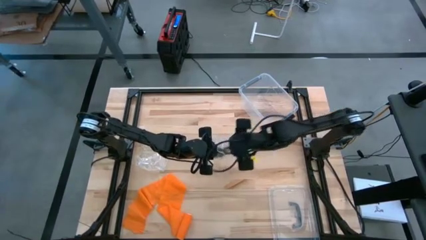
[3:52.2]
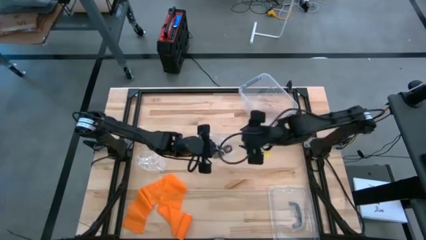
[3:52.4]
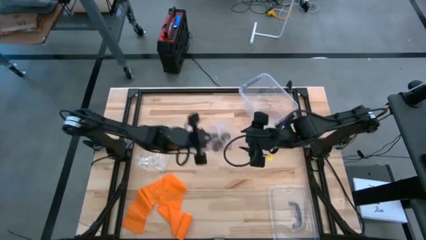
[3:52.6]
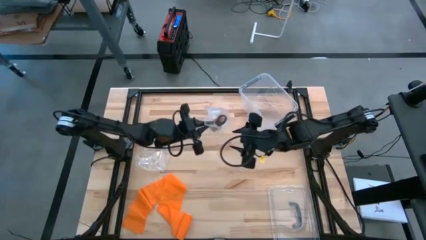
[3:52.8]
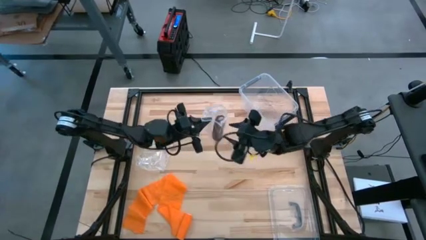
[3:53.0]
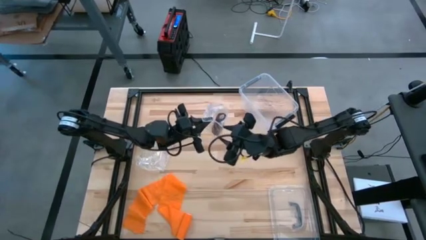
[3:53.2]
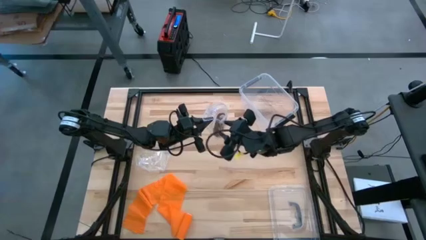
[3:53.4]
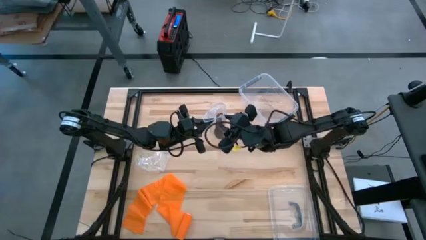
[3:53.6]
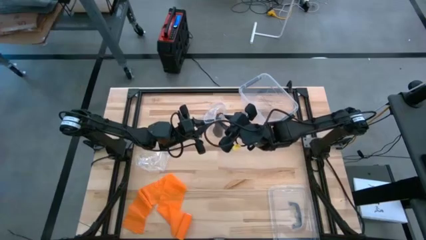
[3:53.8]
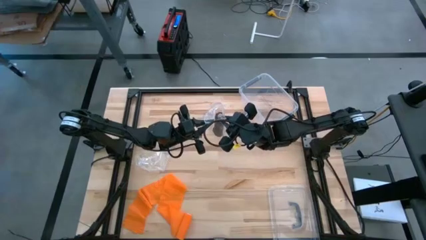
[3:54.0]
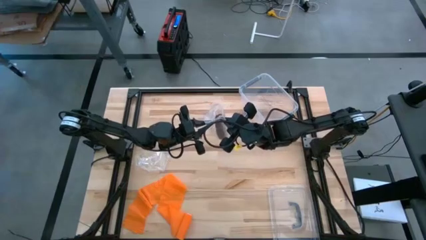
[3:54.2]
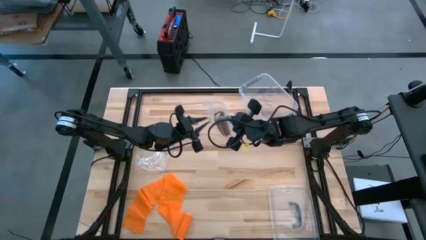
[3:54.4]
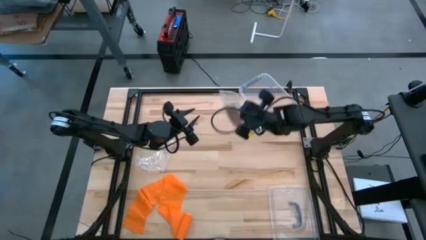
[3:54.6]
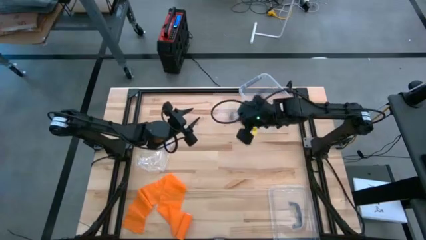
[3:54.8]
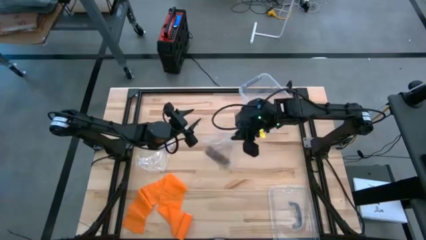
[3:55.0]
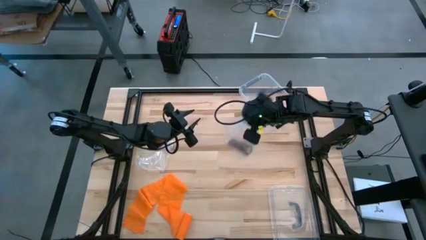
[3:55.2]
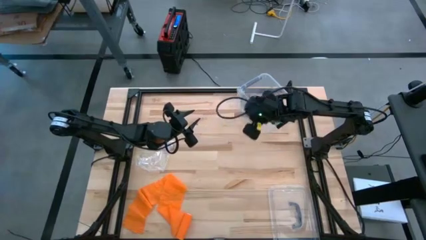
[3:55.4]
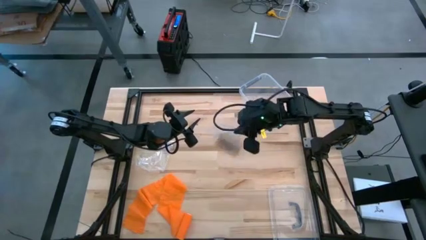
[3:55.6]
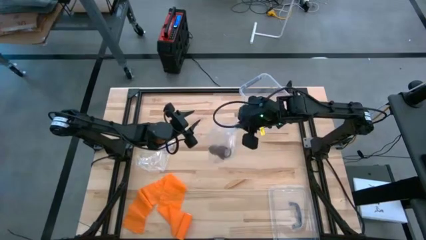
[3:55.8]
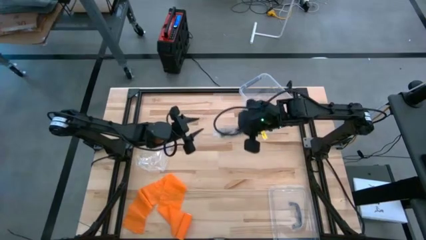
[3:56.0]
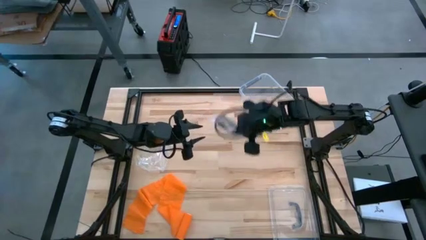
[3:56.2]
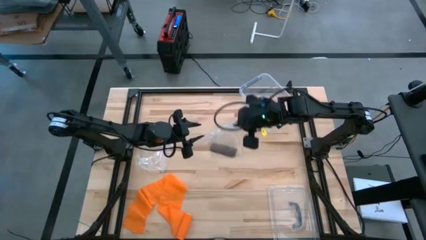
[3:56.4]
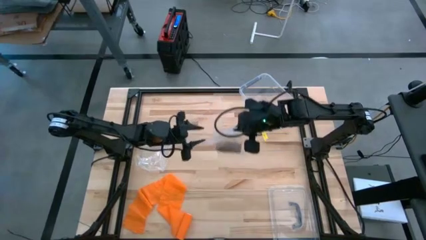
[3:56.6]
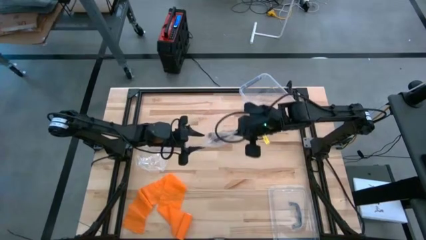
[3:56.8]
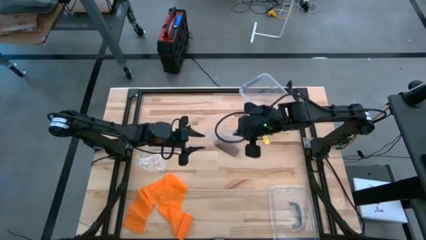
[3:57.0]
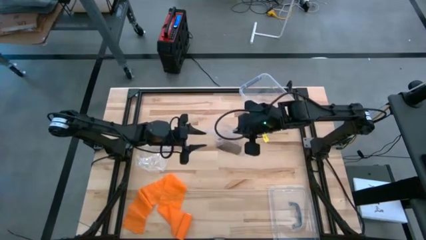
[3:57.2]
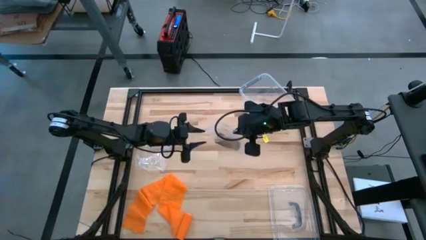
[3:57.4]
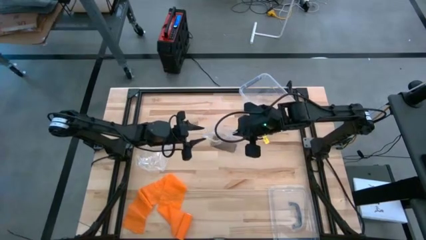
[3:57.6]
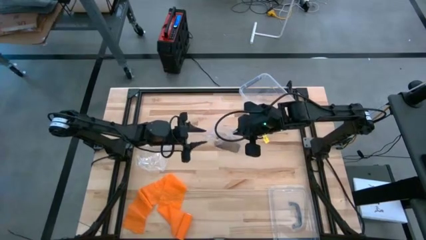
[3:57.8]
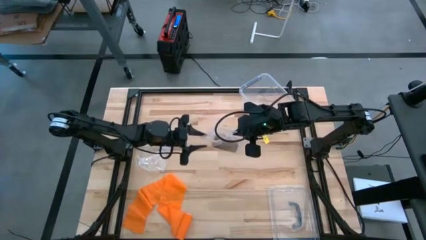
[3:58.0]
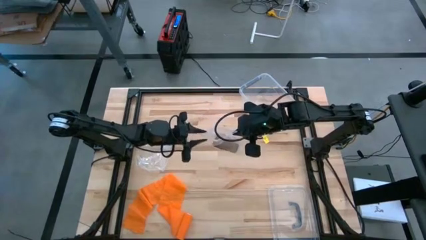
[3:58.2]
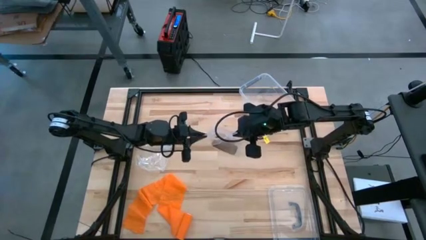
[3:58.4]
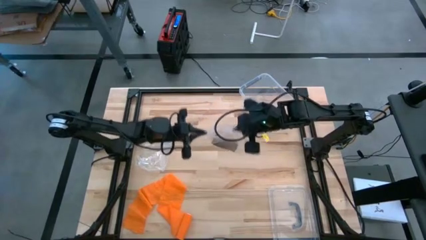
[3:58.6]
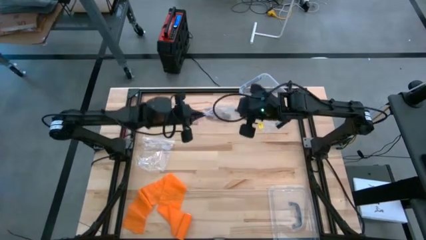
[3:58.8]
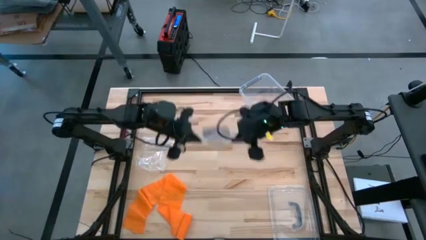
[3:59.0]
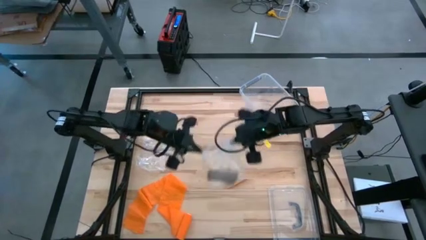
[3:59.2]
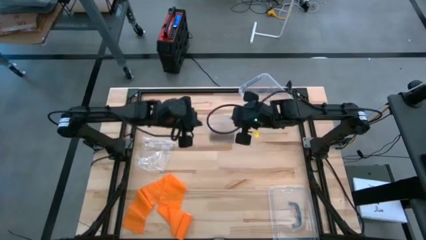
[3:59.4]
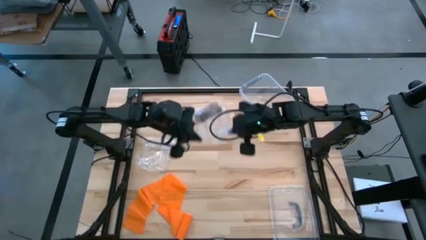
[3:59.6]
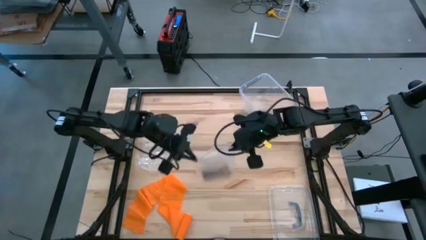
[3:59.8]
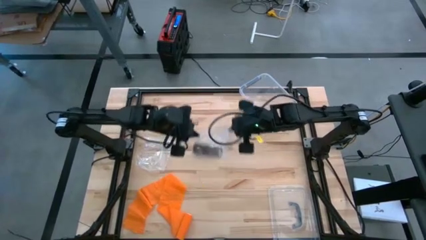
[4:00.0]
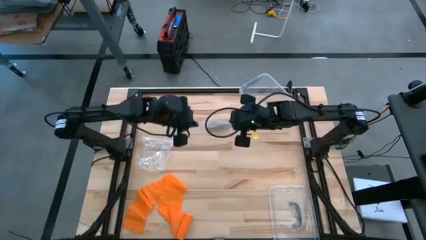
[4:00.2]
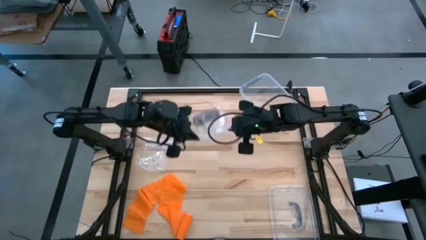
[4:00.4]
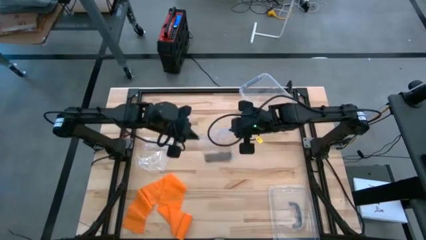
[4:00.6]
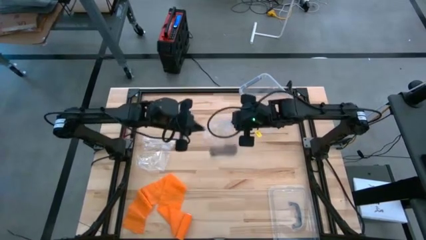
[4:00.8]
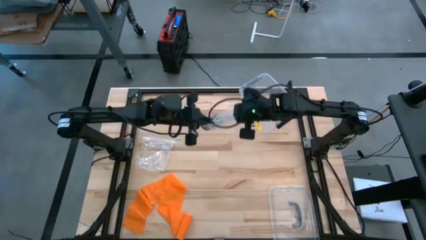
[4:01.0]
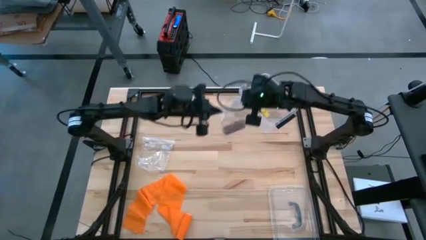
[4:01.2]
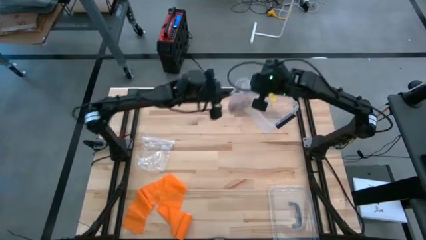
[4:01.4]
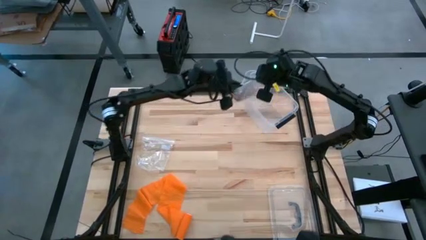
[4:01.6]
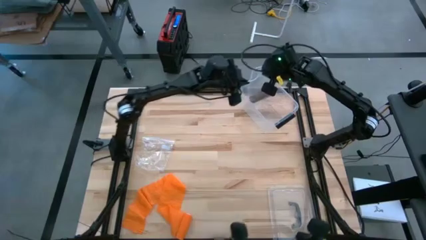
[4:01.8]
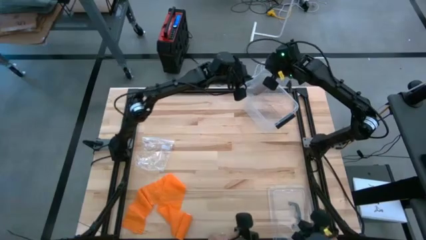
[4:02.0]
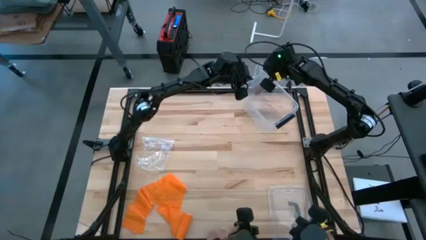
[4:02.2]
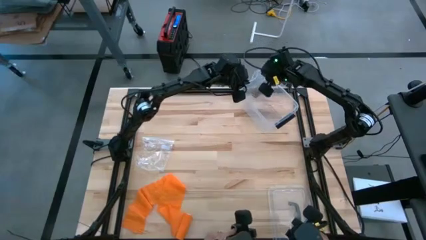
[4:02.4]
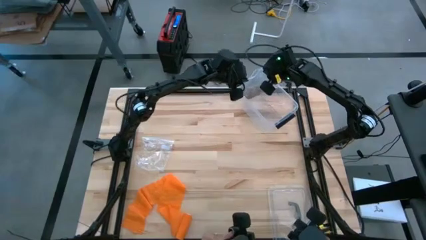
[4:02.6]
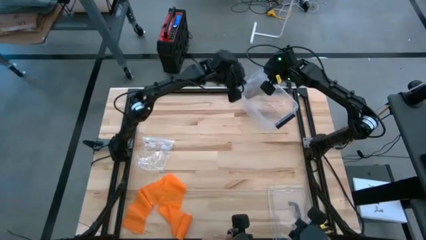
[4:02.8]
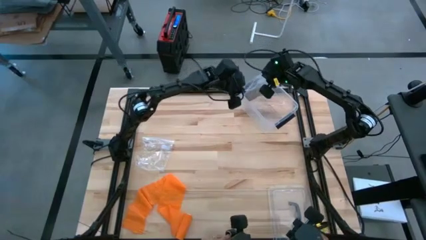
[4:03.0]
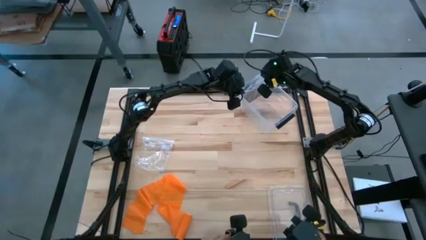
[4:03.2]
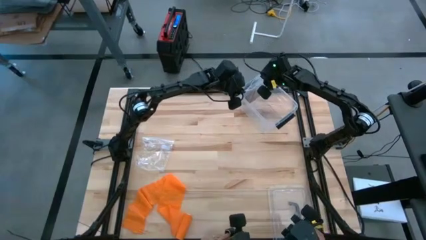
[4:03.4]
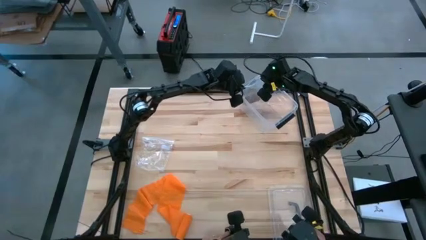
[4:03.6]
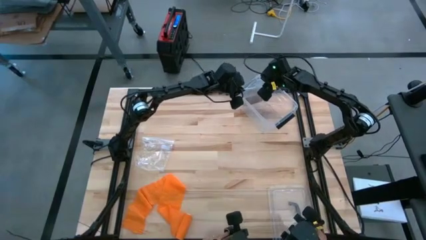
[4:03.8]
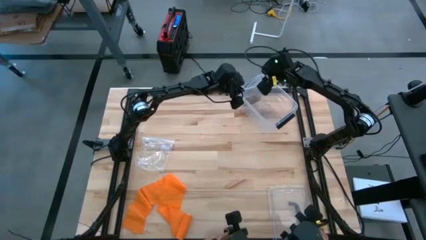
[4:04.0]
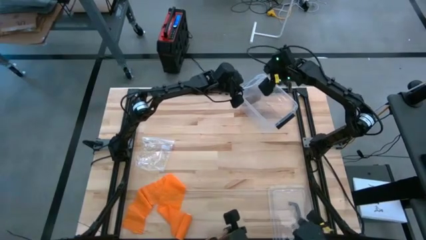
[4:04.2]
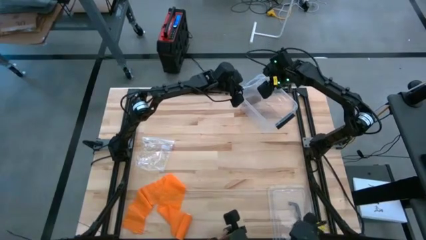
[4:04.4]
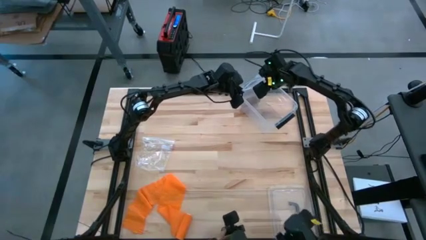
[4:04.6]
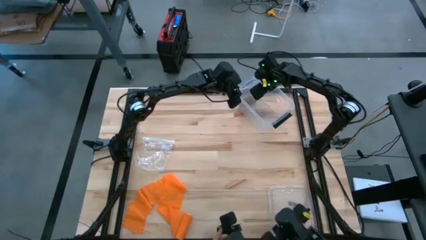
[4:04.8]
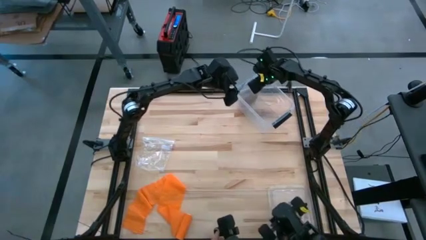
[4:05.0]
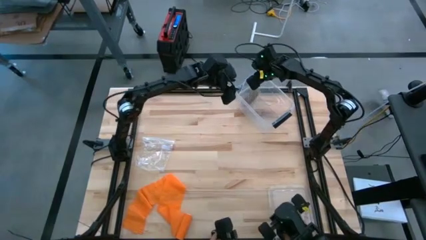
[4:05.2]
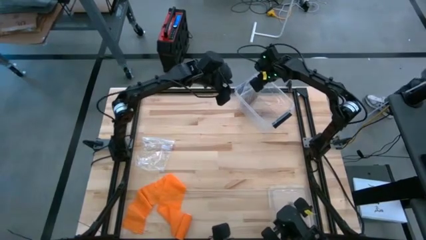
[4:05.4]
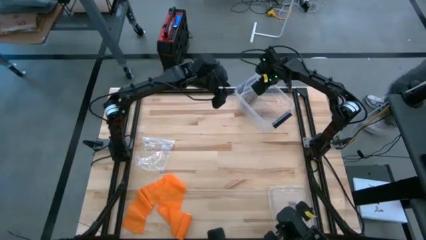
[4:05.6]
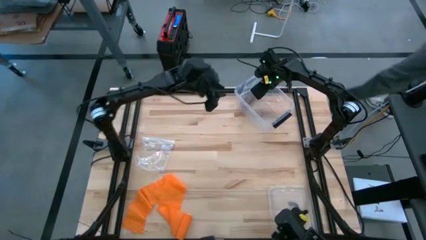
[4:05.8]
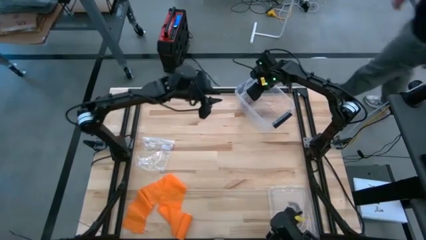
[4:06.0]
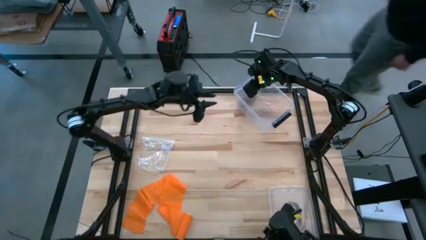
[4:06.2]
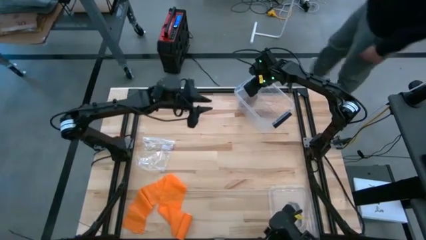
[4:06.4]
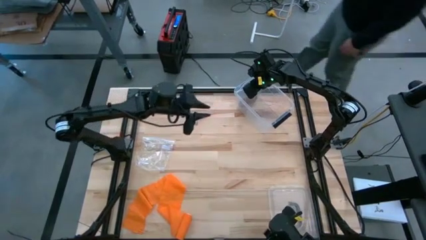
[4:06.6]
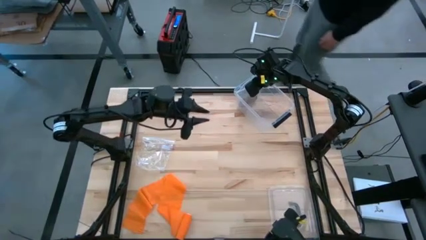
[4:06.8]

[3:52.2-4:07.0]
Task: Roll bandage
Put the zip bag with the brown bandage into the transparent bin

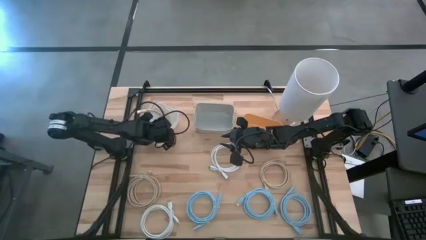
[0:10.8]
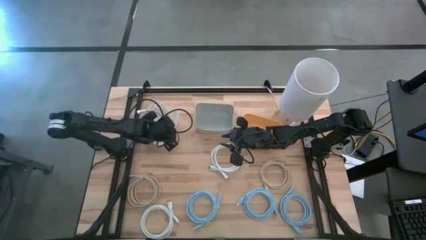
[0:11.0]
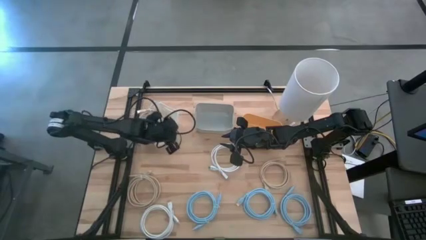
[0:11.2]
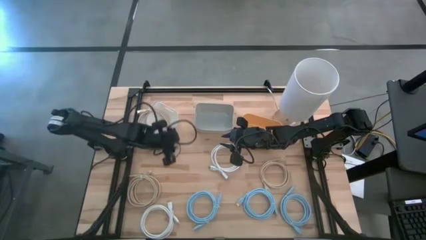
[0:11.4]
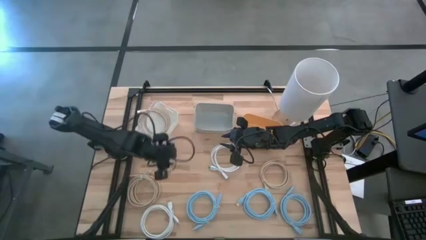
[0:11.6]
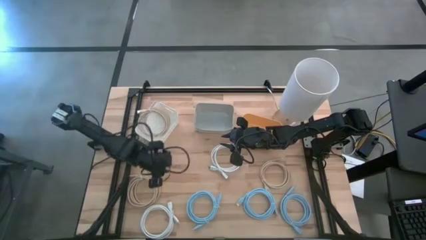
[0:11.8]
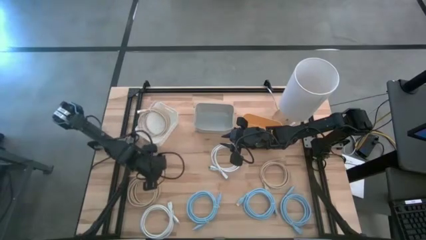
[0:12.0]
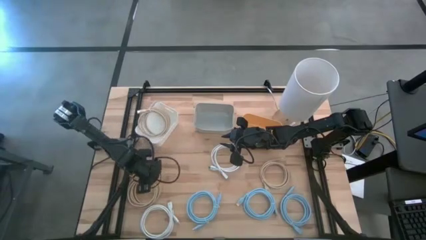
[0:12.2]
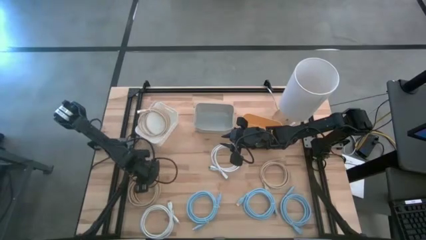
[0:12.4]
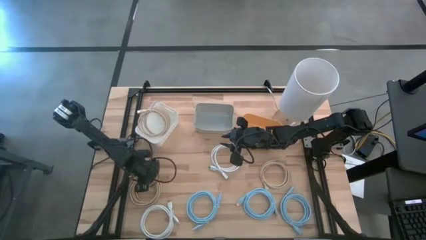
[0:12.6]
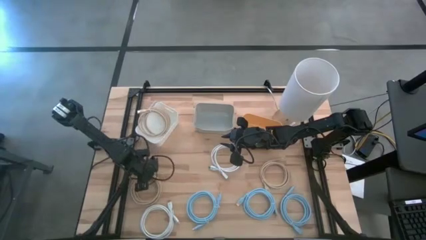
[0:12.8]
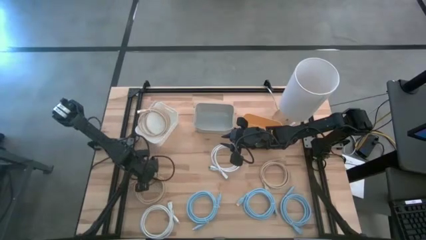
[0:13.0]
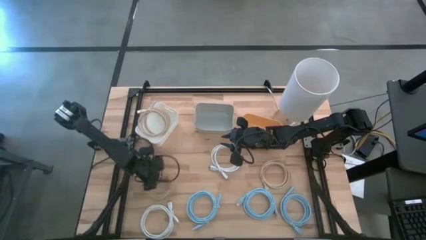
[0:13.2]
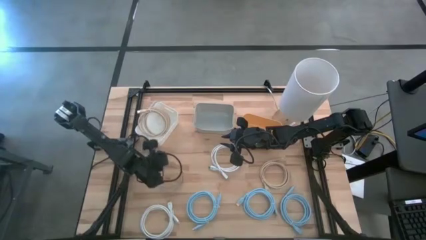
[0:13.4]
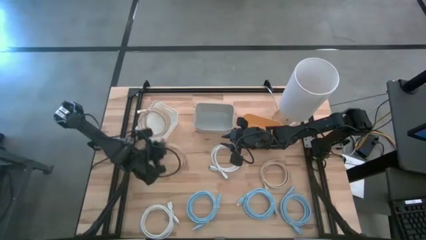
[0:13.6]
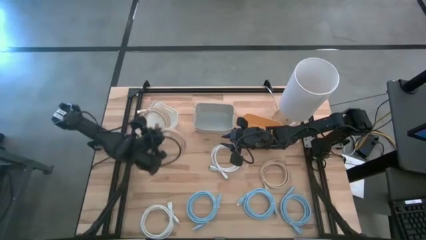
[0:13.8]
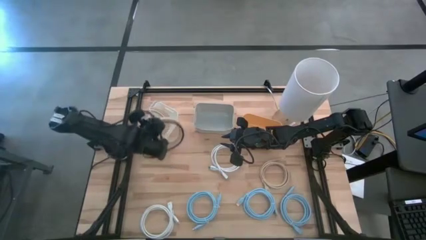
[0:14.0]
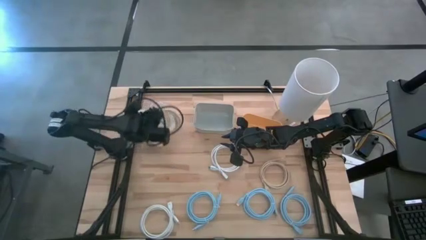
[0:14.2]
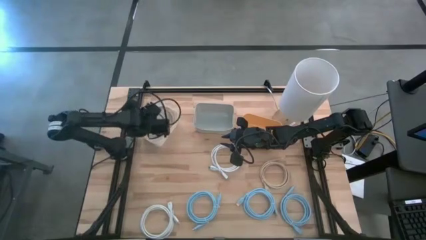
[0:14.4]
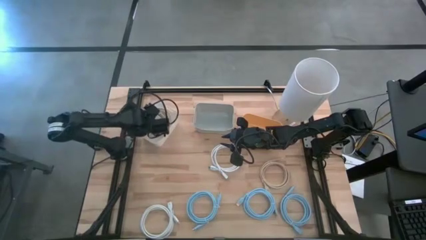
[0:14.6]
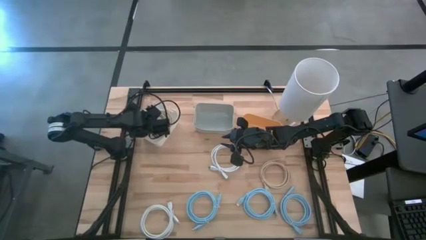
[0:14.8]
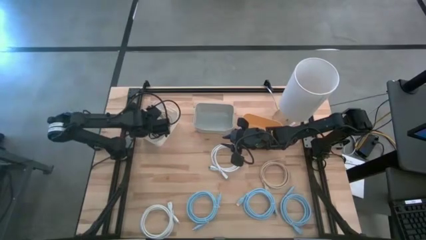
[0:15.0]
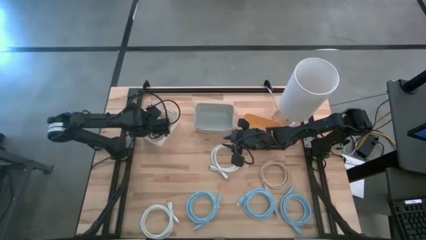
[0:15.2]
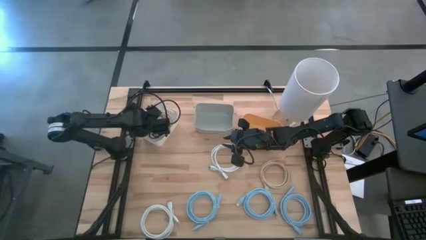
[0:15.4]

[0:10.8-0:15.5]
Task: Sort HDMI cables
Put the left brown HDMI cable into the white bin
